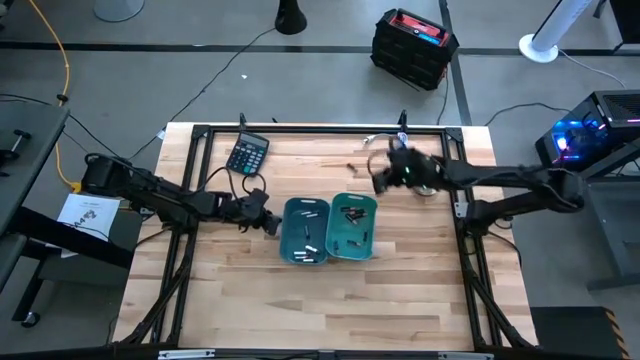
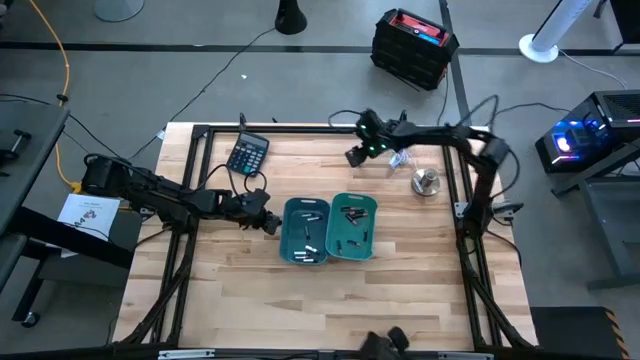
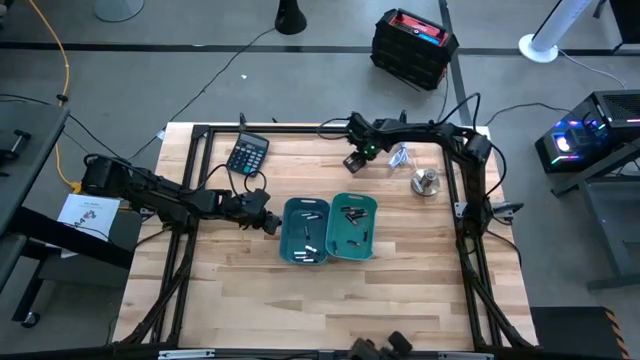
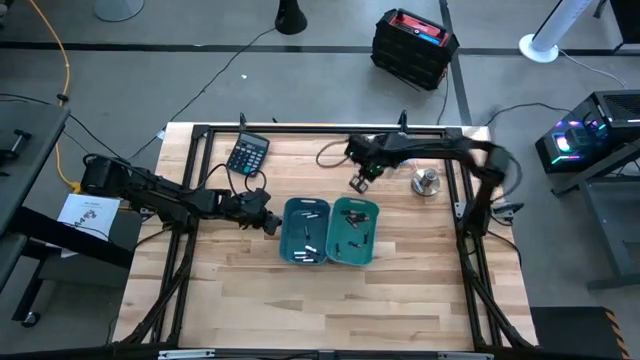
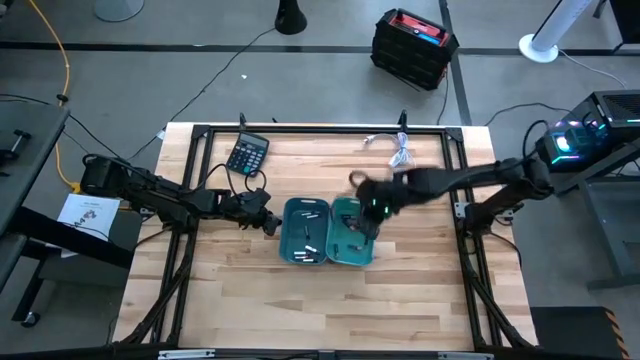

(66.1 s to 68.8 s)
Task: Sort batteries
Put the black battery into the green bin

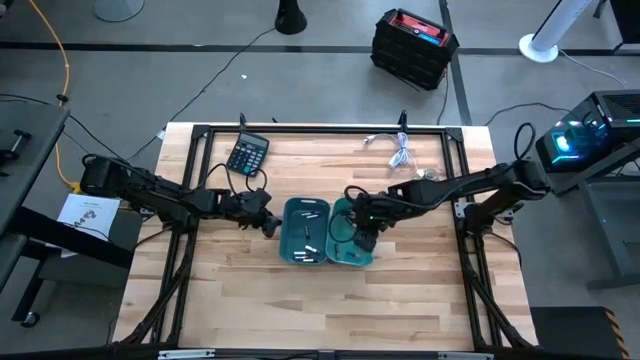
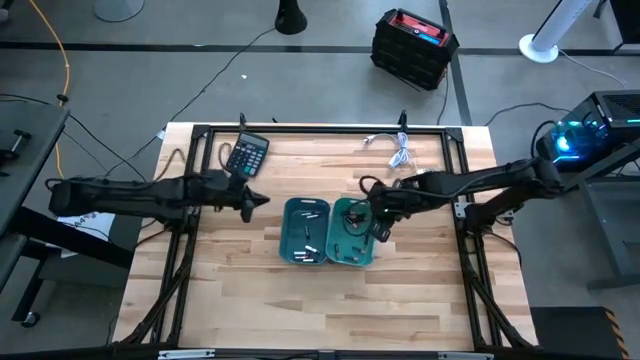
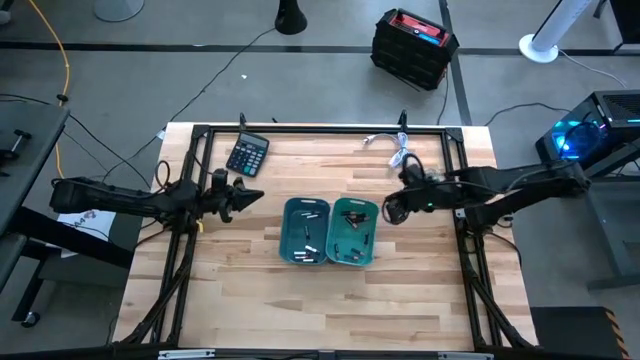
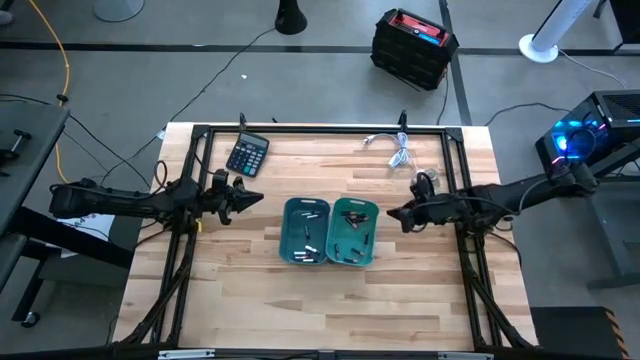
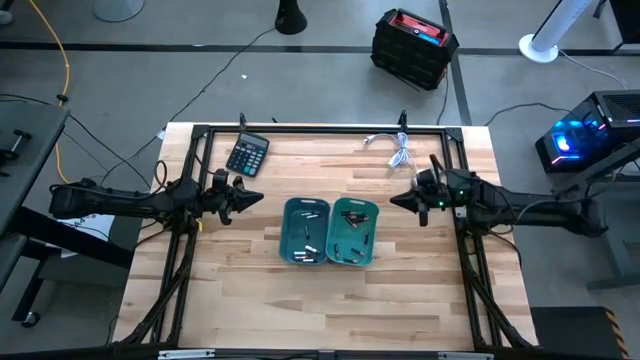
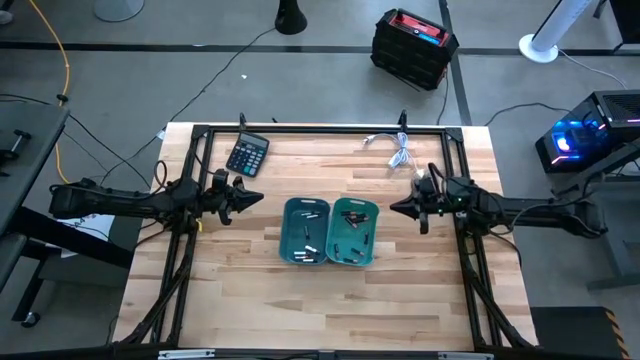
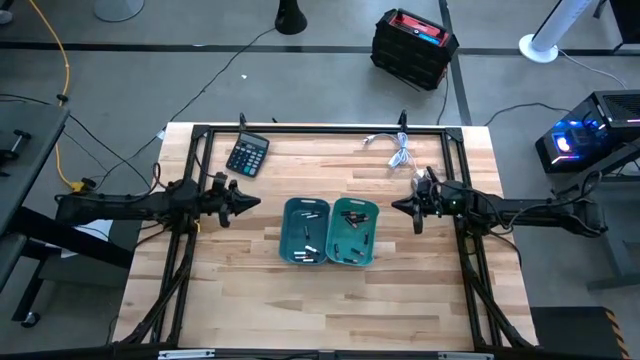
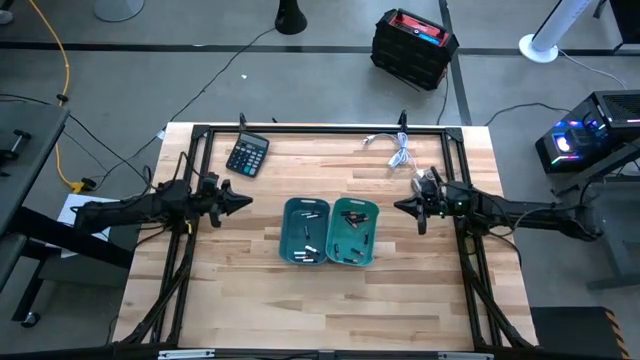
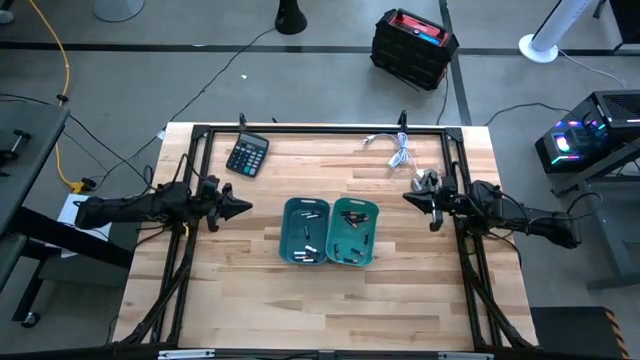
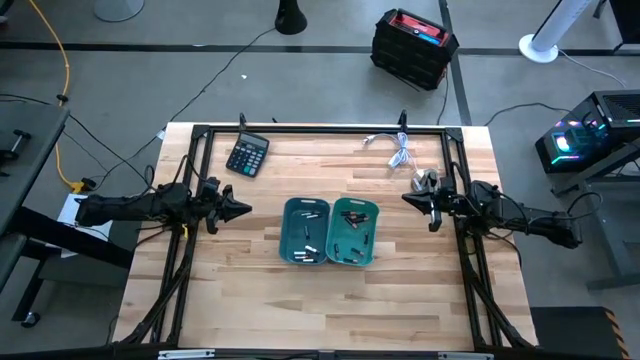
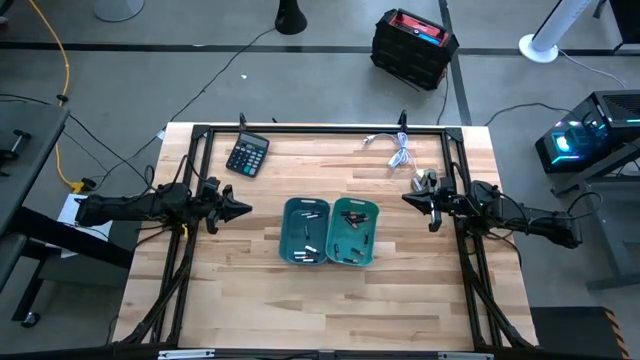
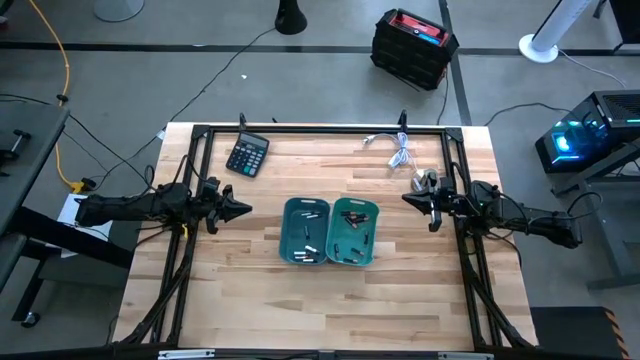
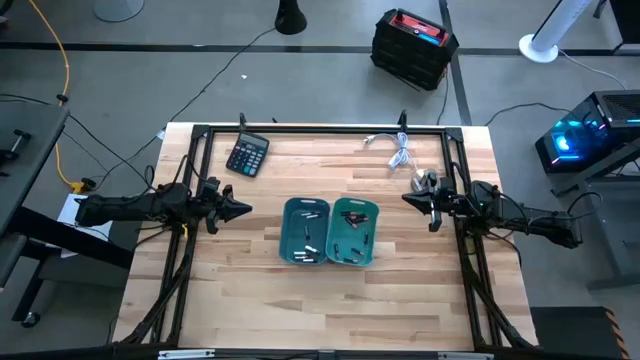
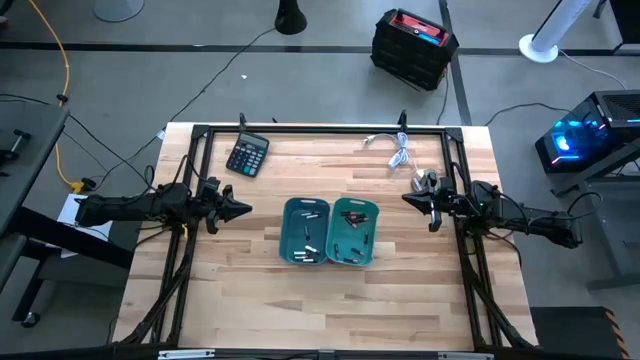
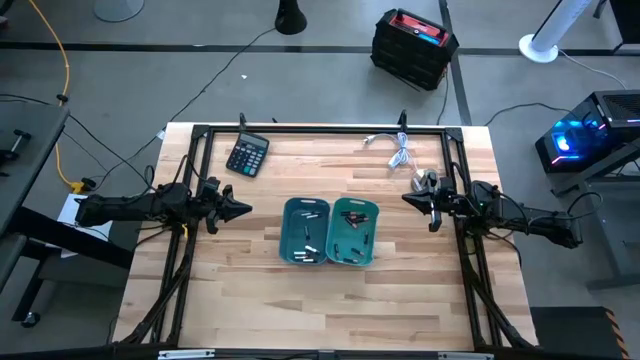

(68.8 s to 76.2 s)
Return to Home Position

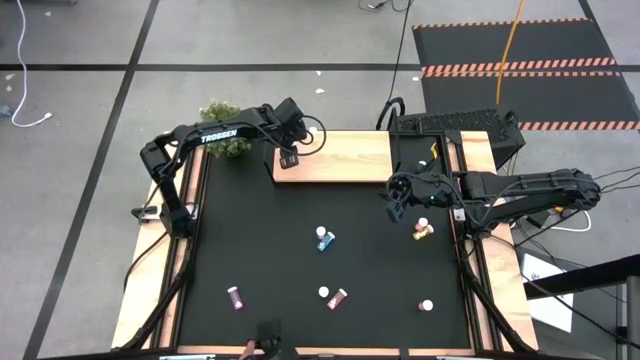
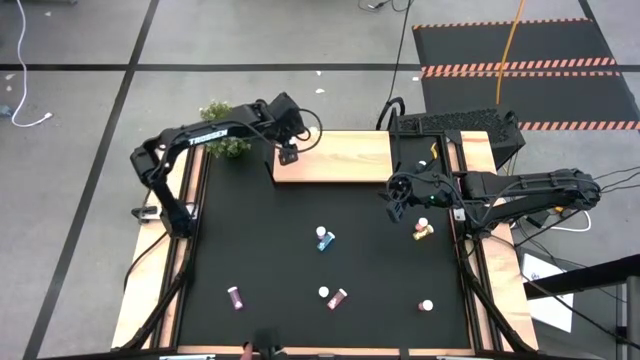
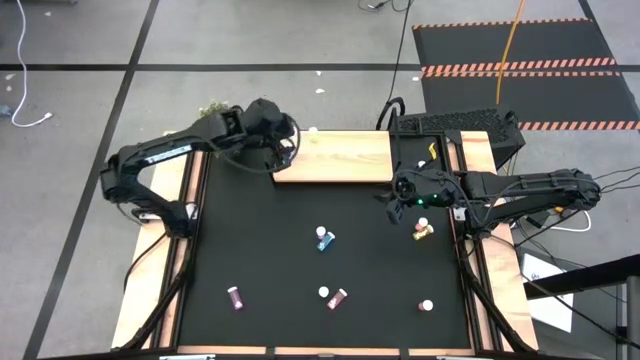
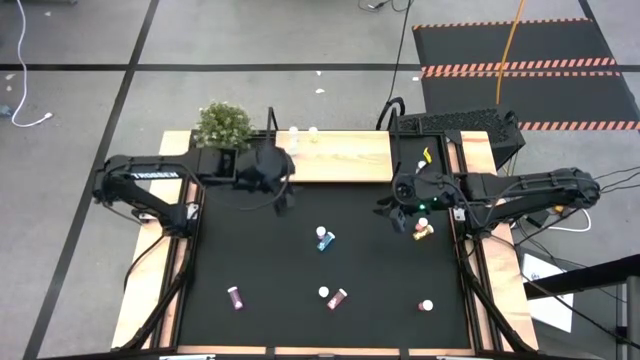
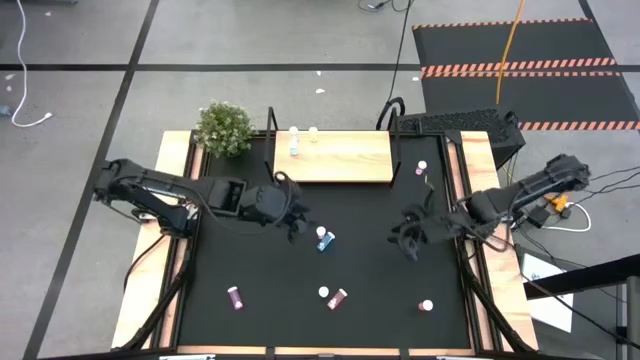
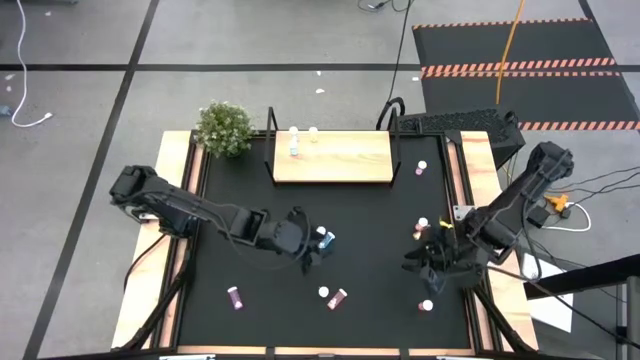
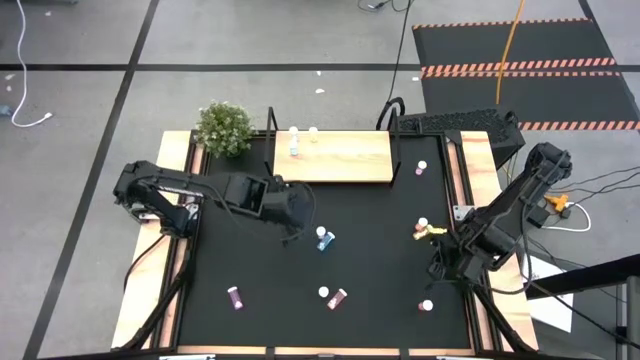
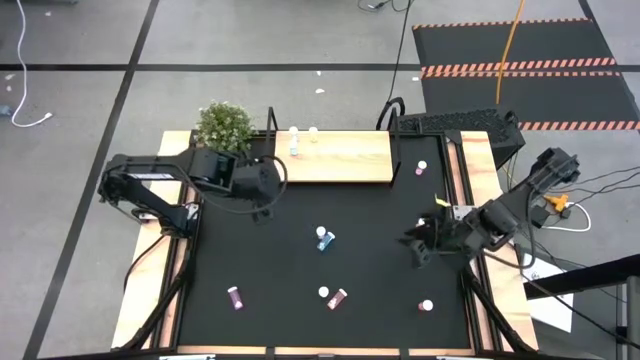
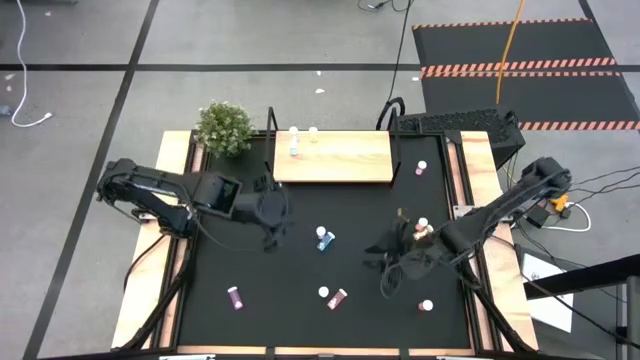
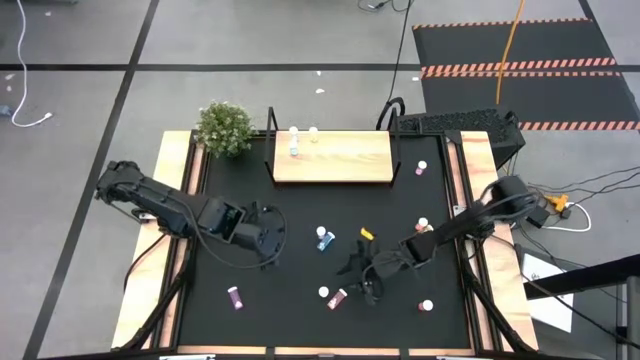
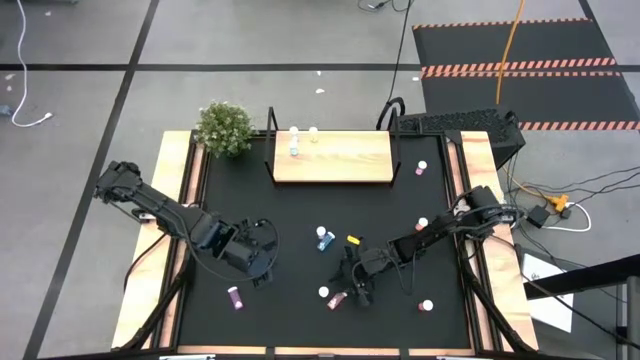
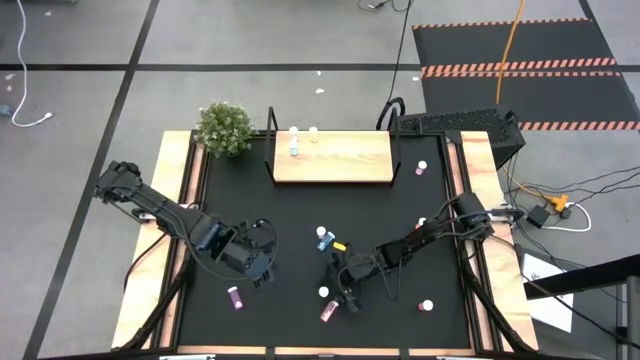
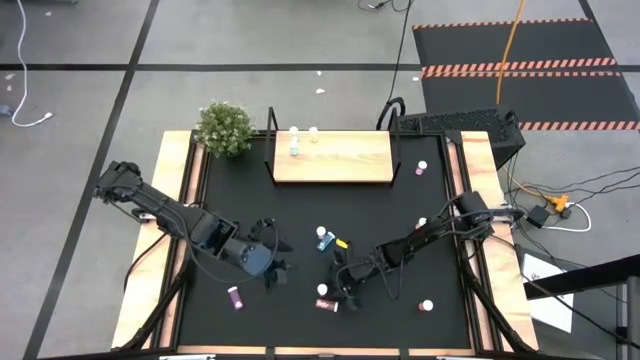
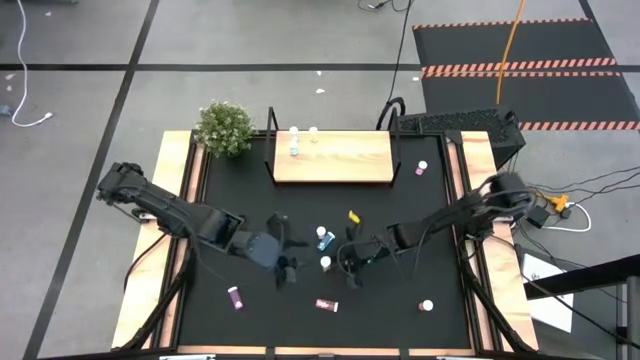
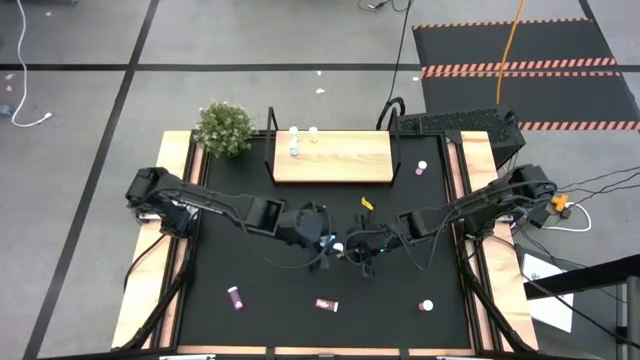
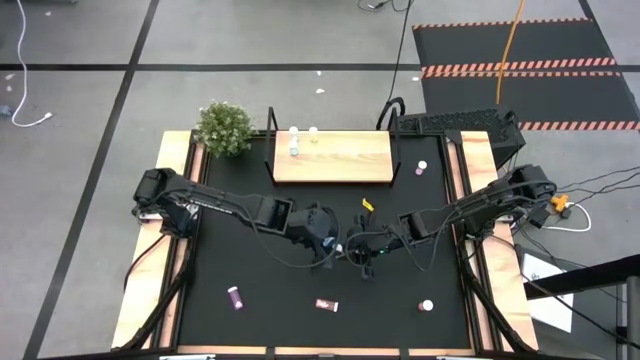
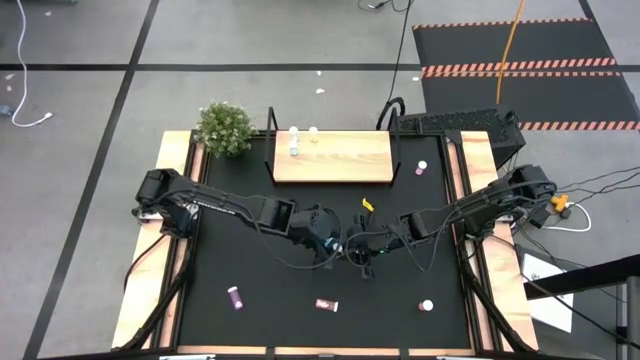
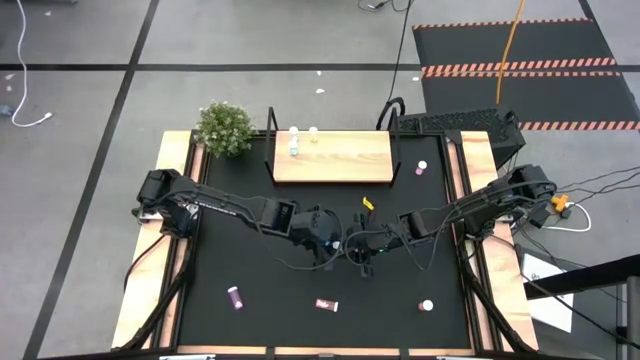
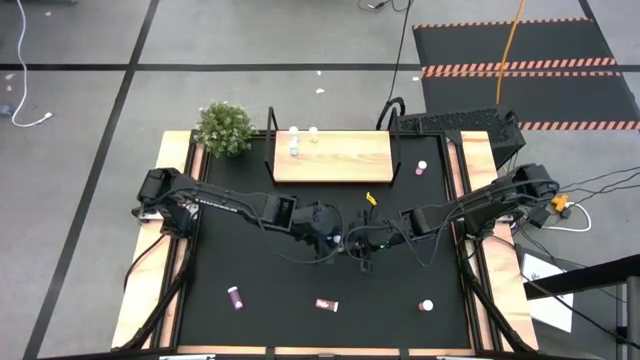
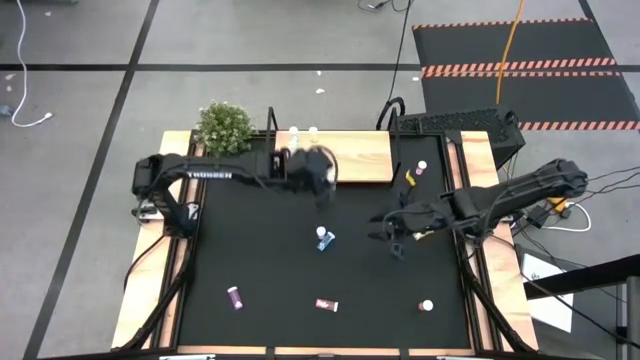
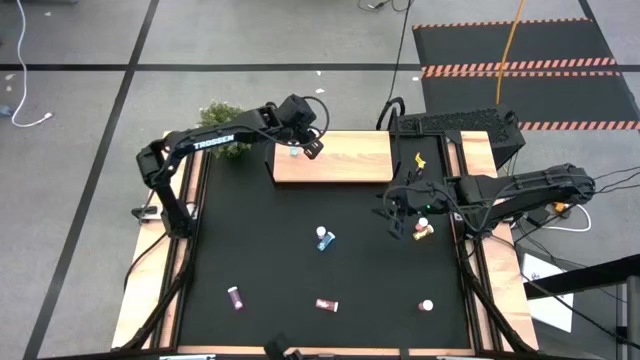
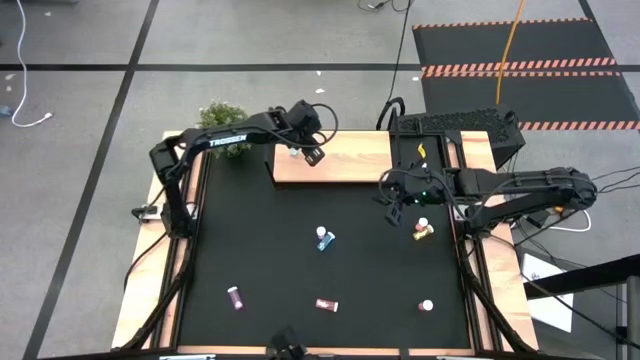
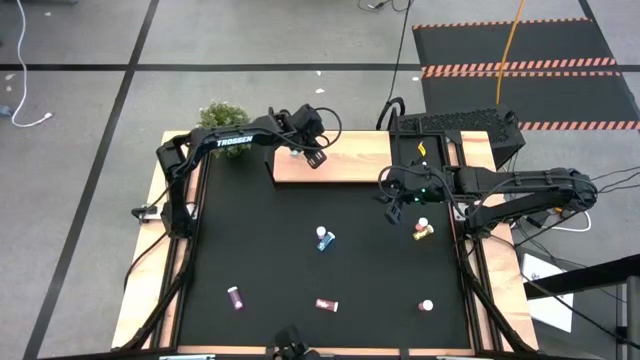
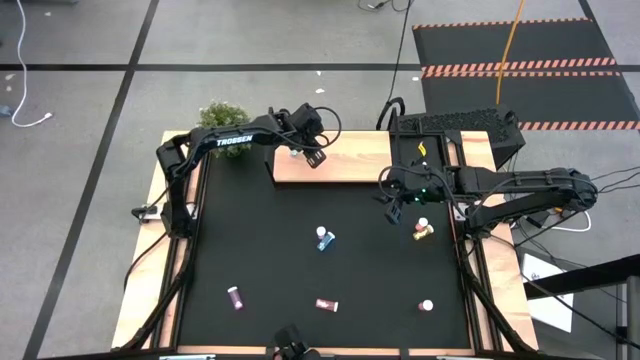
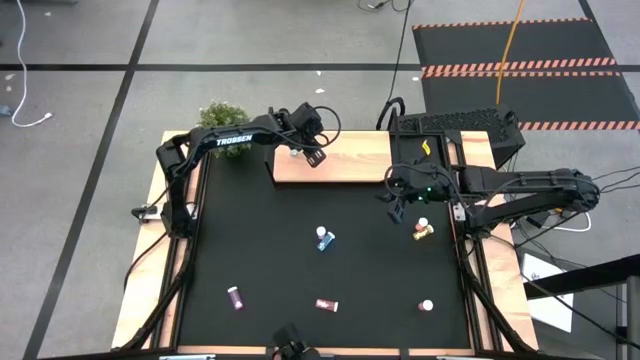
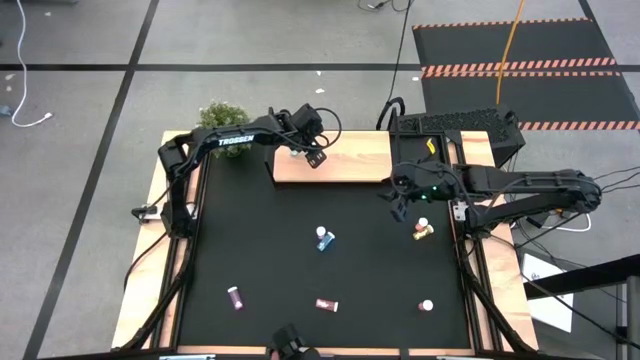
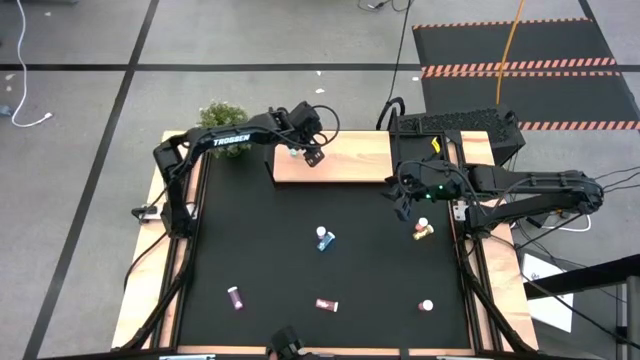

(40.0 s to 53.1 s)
Task: Pick and place medicine bottles onto shelf by color
Put the bottom center yellow pill bottle on the shelf
